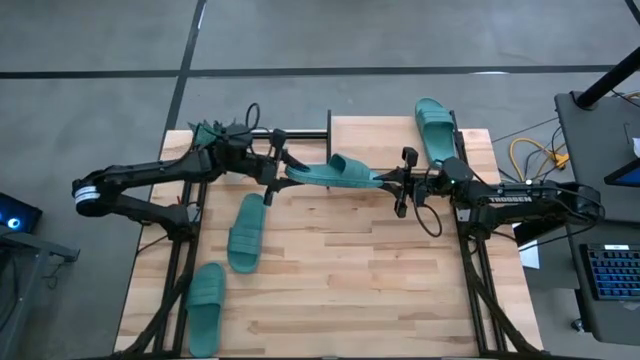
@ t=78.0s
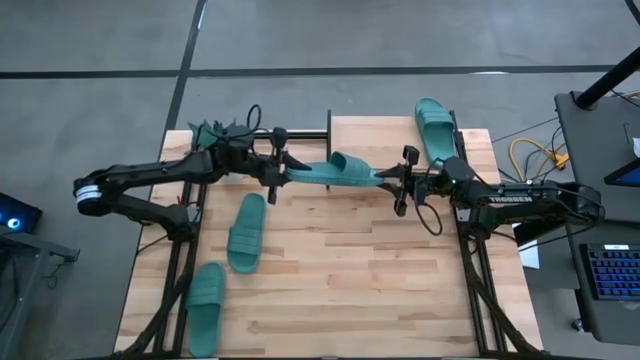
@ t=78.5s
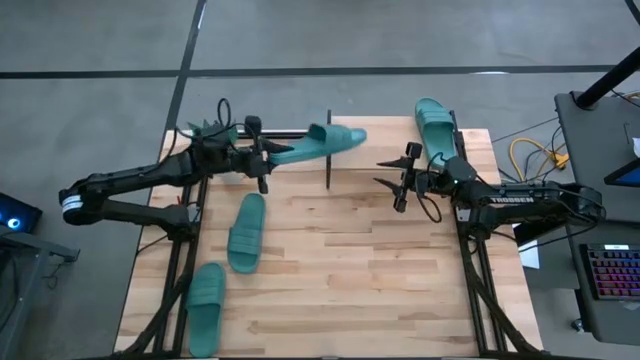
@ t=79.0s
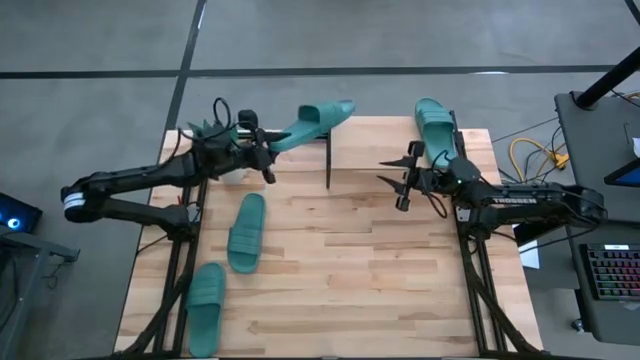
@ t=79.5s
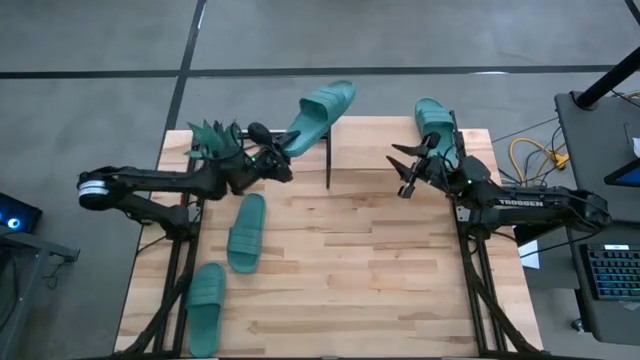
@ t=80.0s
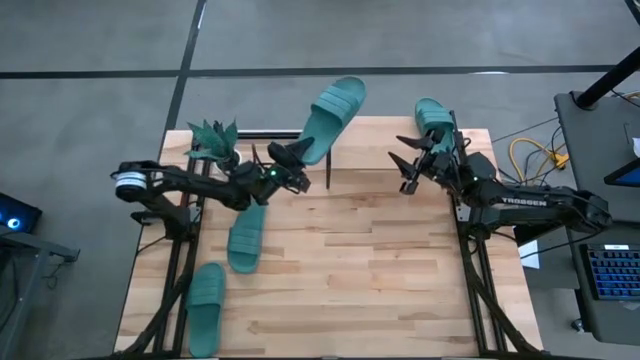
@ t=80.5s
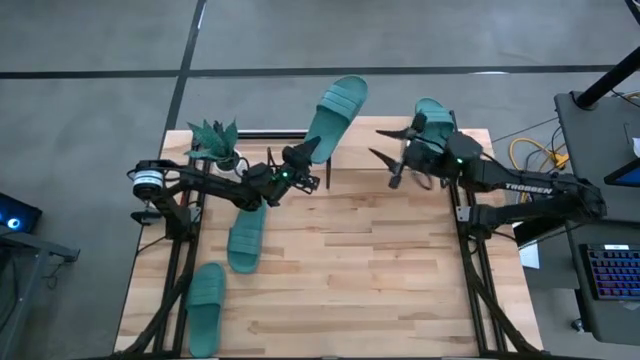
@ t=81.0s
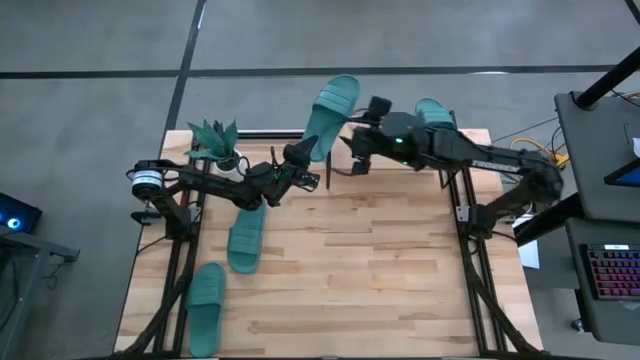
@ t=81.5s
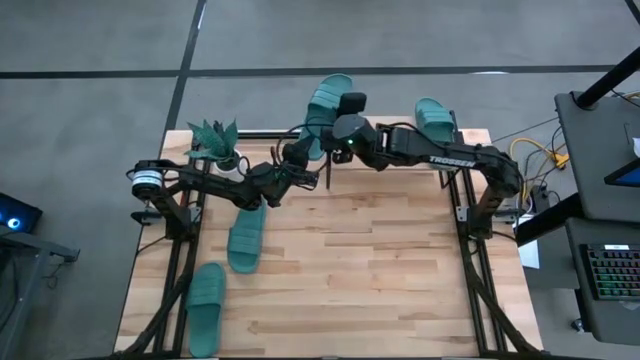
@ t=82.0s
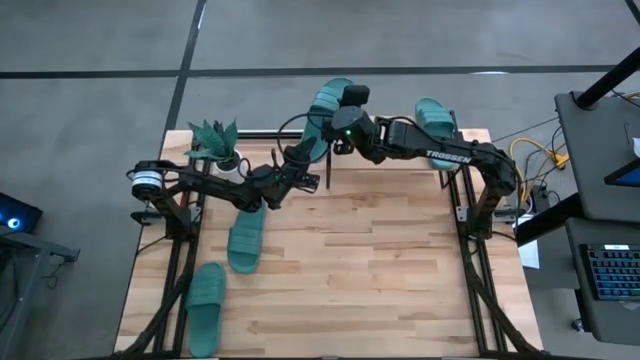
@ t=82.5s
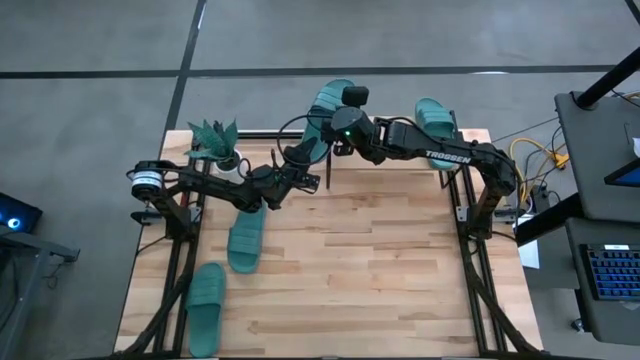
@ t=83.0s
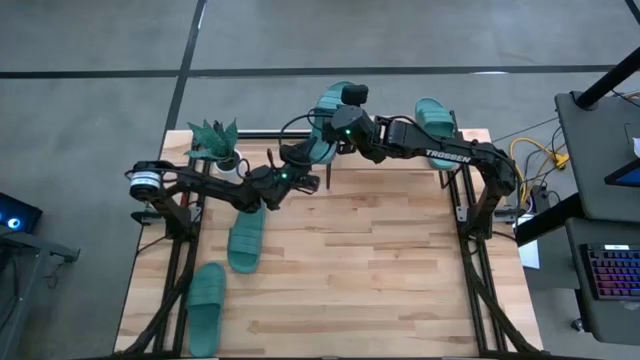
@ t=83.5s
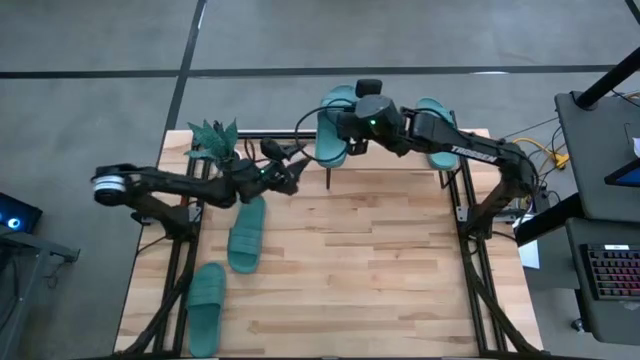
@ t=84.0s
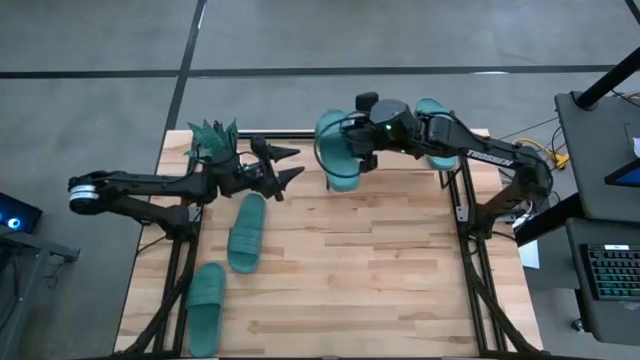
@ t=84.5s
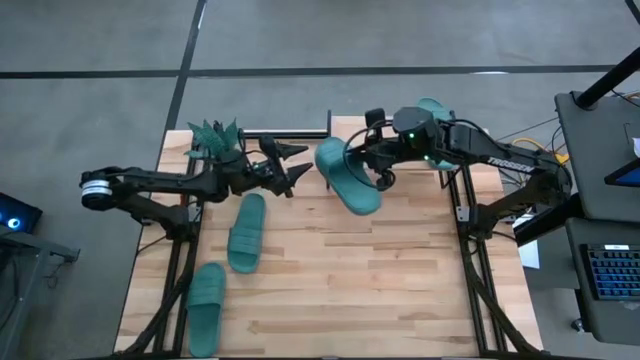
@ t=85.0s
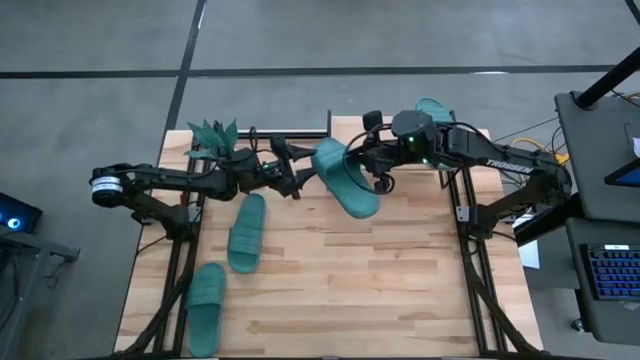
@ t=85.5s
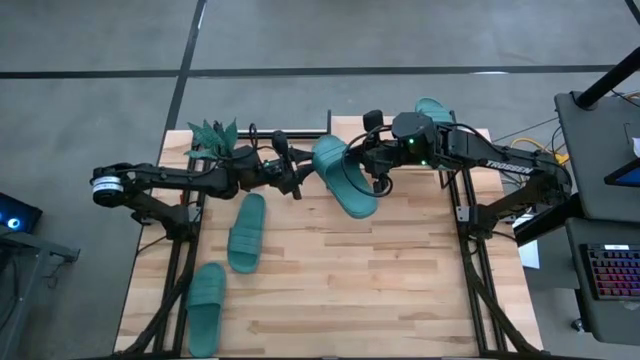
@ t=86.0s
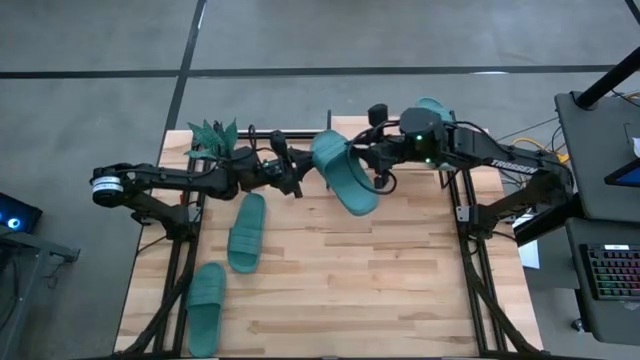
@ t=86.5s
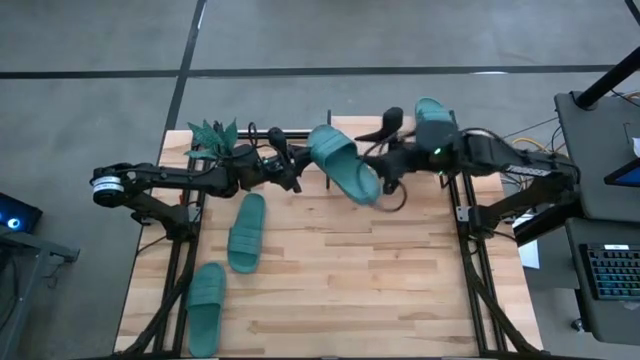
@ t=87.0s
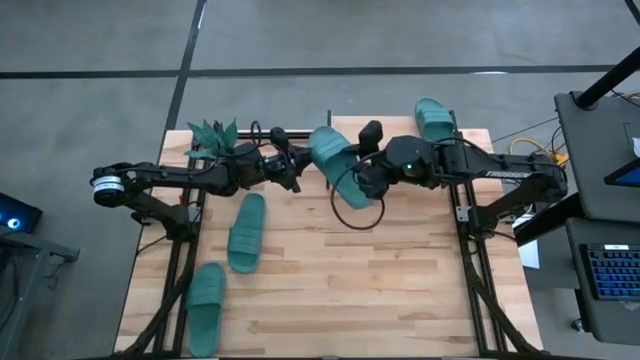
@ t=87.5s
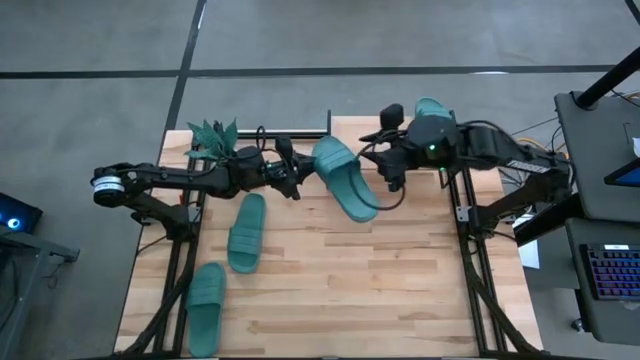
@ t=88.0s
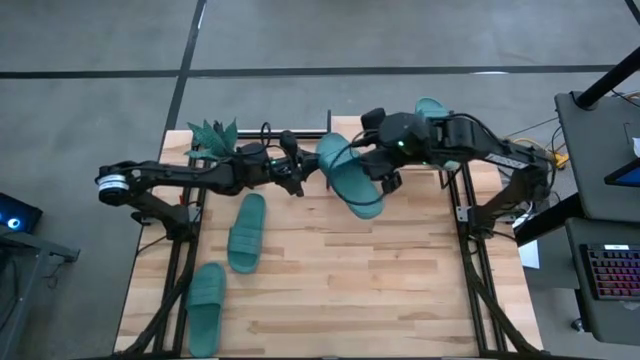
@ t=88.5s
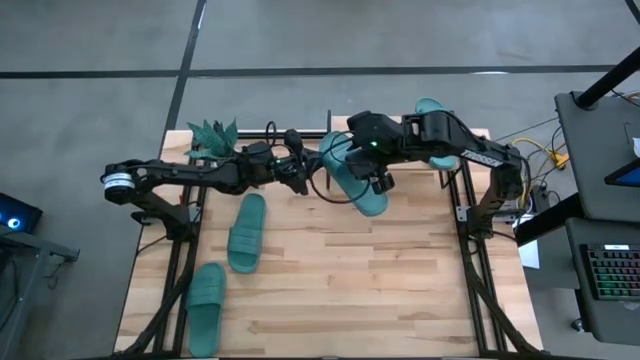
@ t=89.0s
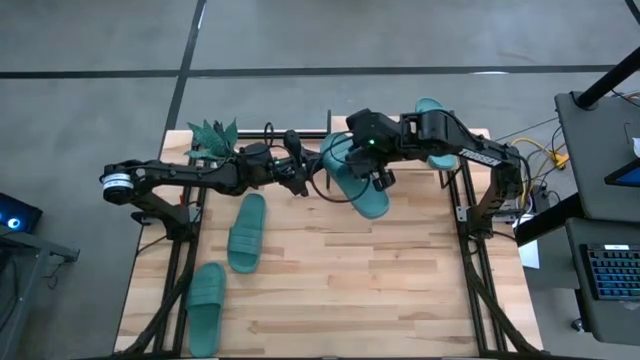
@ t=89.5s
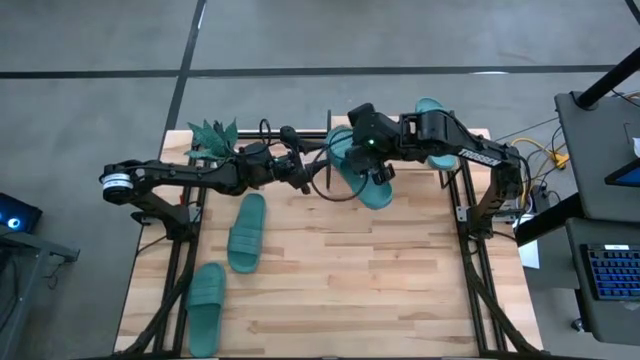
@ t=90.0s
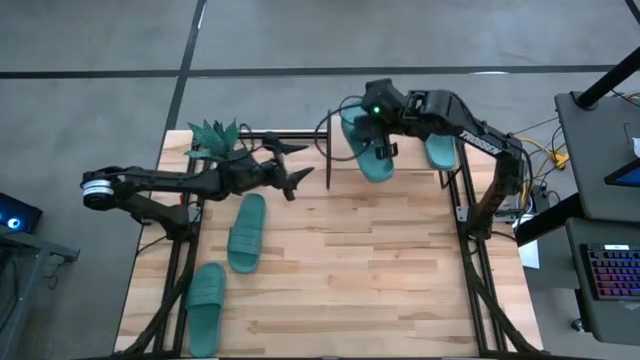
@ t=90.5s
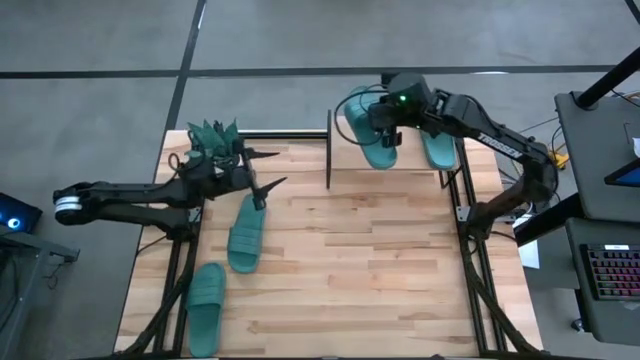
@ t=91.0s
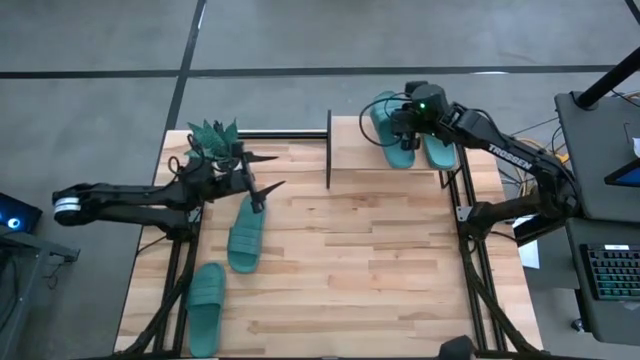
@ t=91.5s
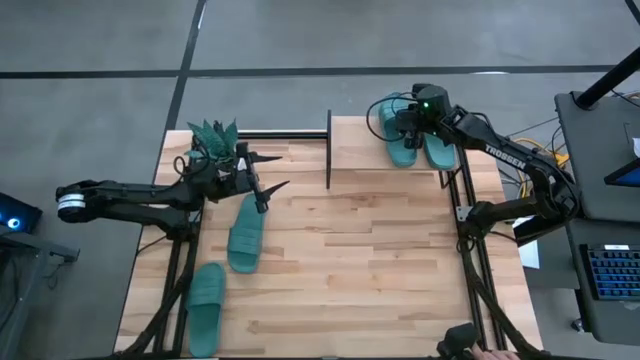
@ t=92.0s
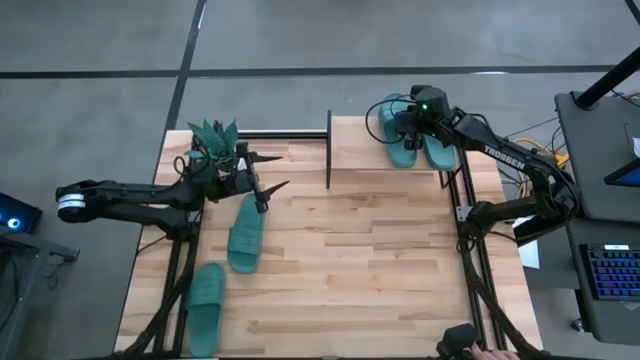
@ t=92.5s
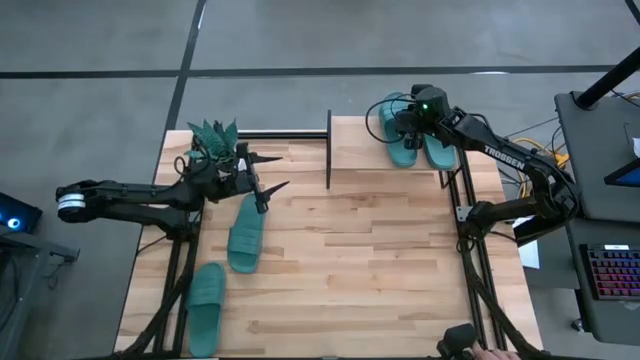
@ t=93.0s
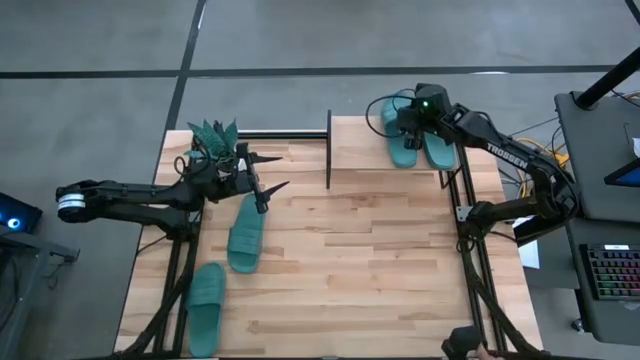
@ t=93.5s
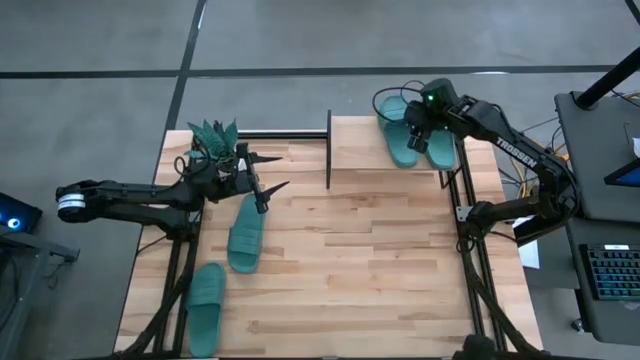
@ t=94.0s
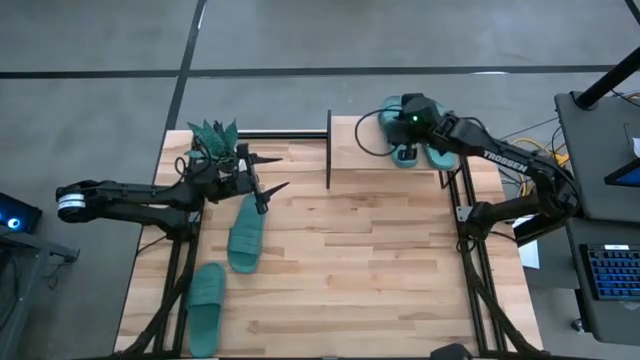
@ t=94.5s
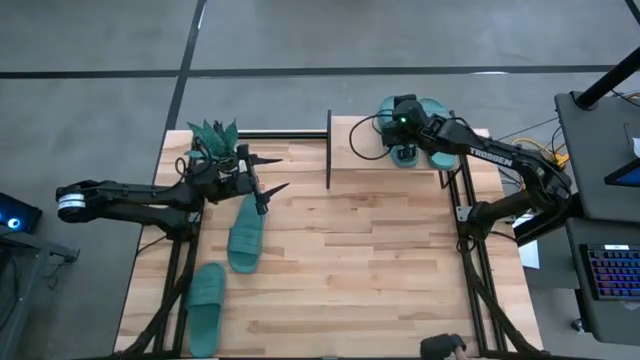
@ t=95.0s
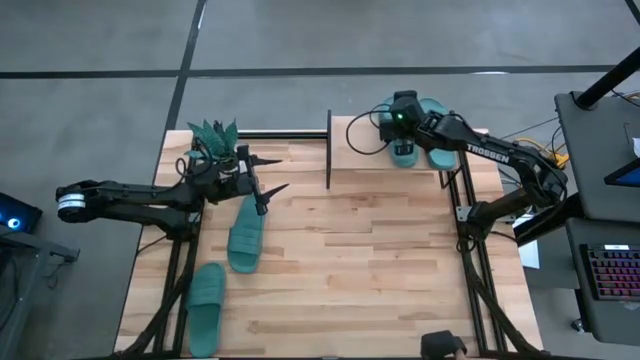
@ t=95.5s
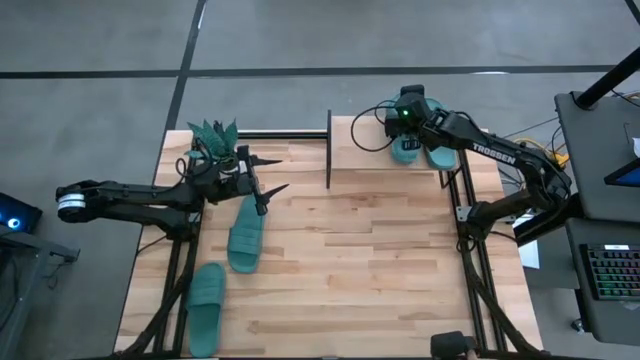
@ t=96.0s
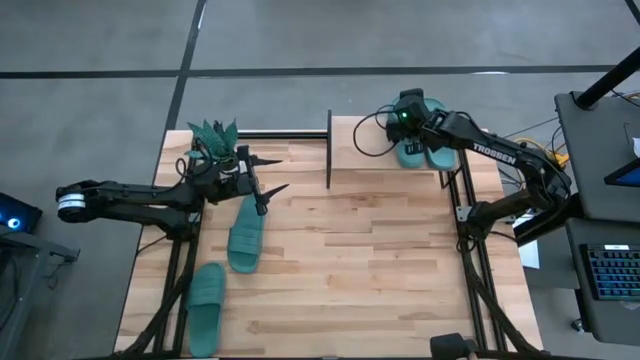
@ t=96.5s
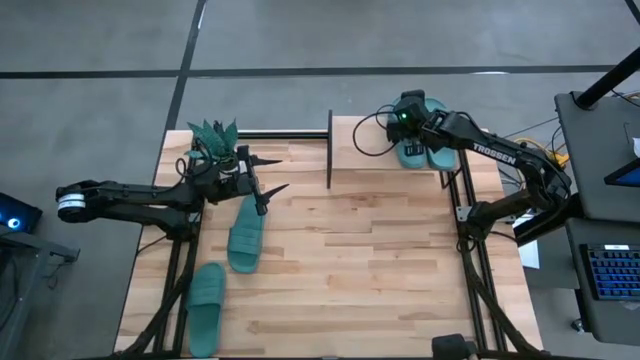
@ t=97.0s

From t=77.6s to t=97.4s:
Task: Pick and place slides into the shelf
Put the top right green slipper on the shelf

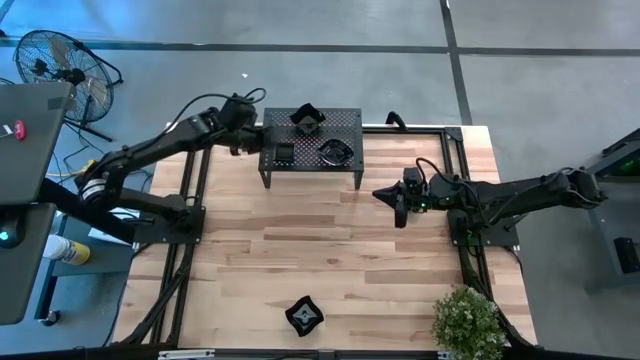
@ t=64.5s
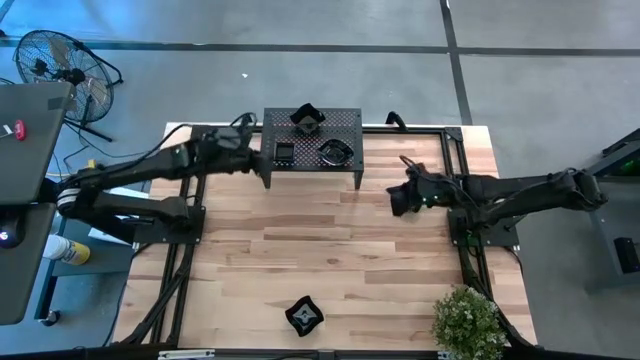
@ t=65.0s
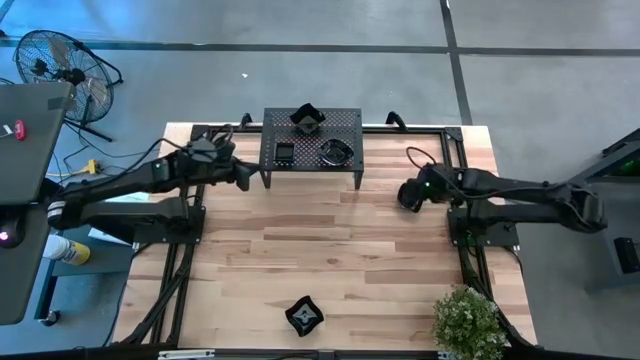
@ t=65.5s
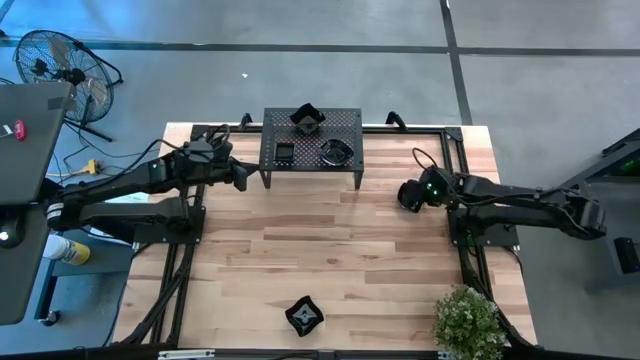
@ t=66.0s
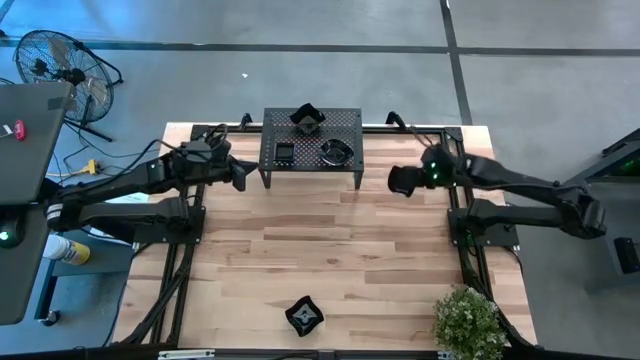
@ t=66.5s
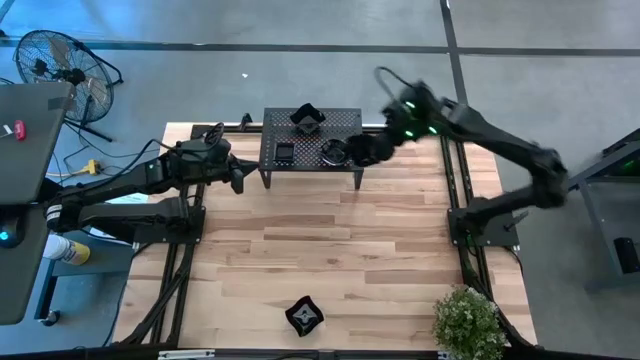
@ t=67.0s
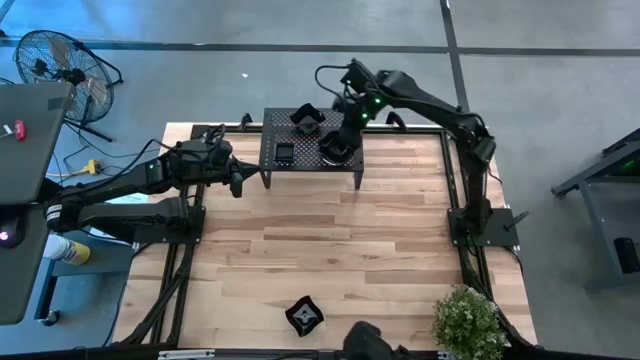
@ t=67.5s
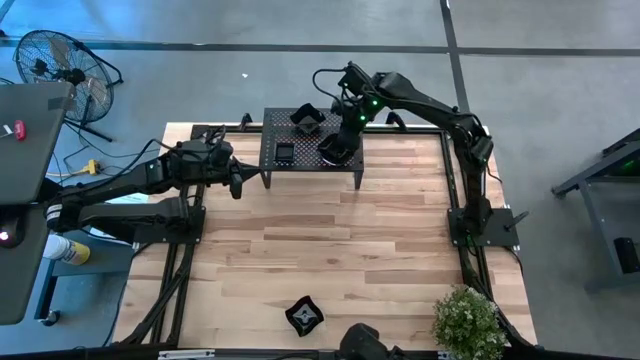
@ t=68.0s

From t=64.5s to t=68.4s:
Task: Pick & Place Mini shaped plates
Stack the black leaf shaped plate on top of the black leaf shaped plate on the shelf
